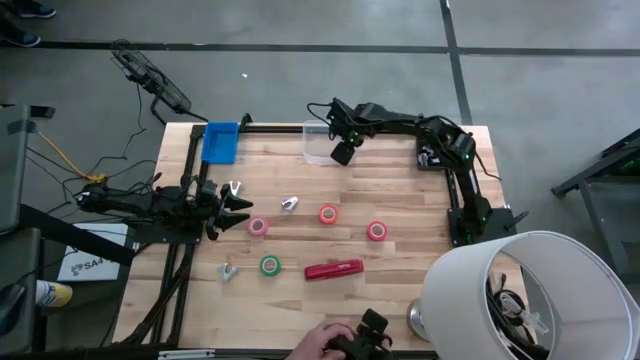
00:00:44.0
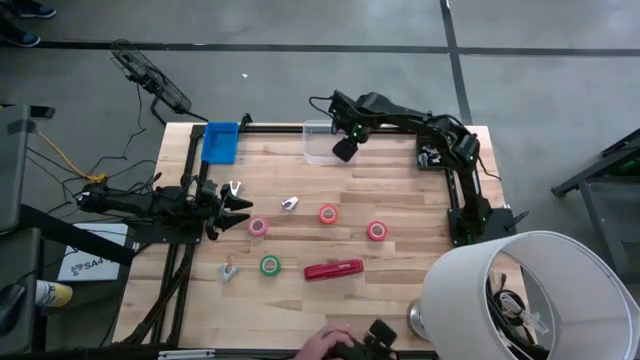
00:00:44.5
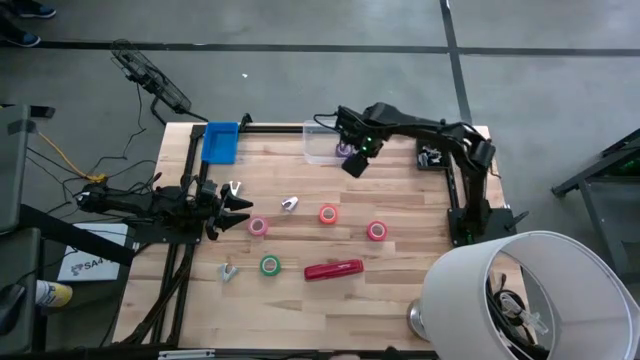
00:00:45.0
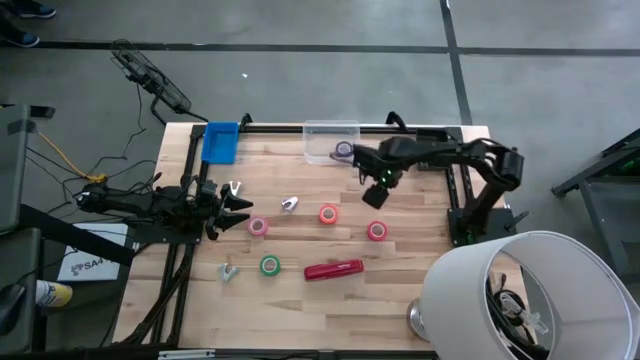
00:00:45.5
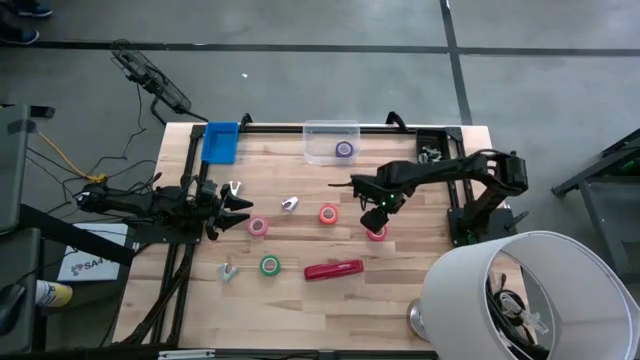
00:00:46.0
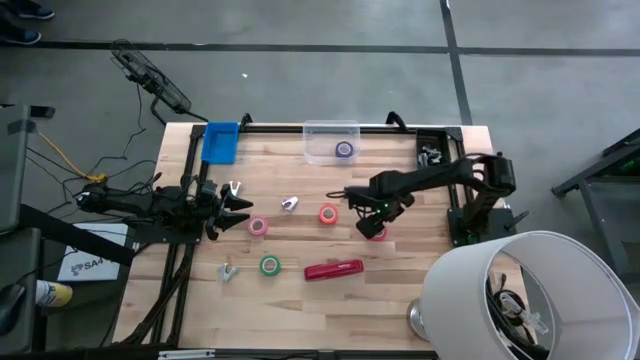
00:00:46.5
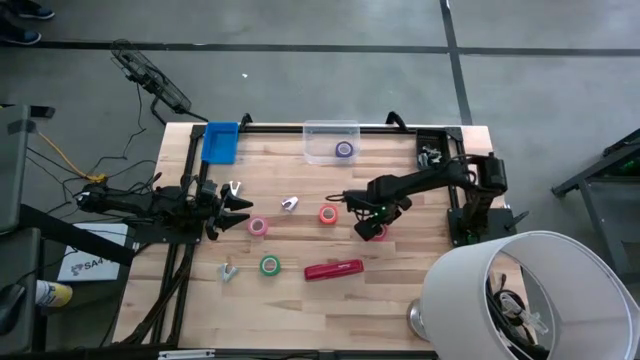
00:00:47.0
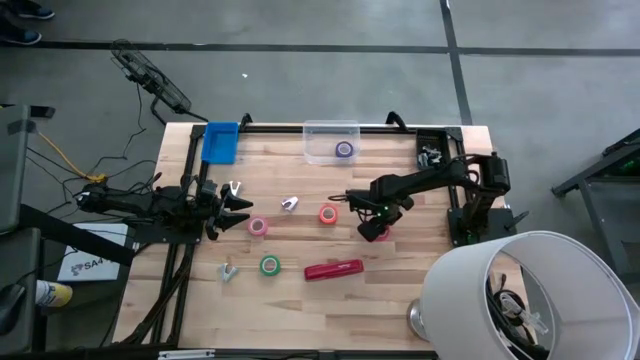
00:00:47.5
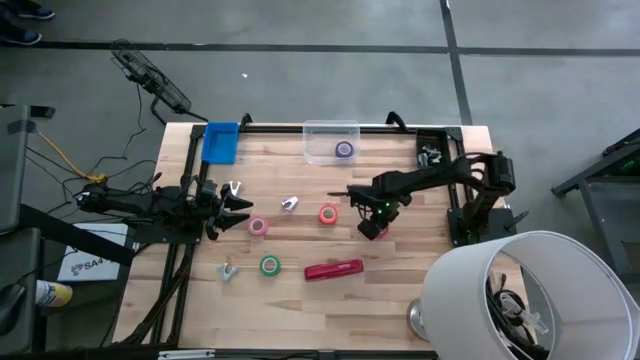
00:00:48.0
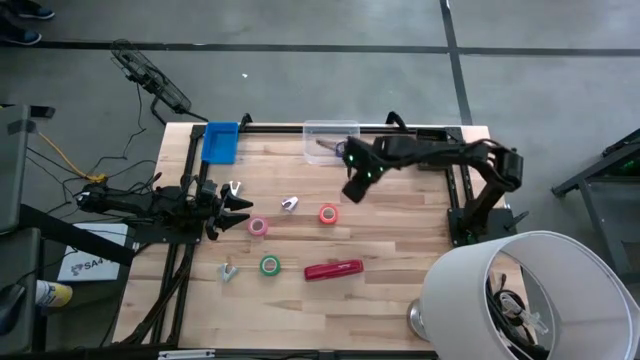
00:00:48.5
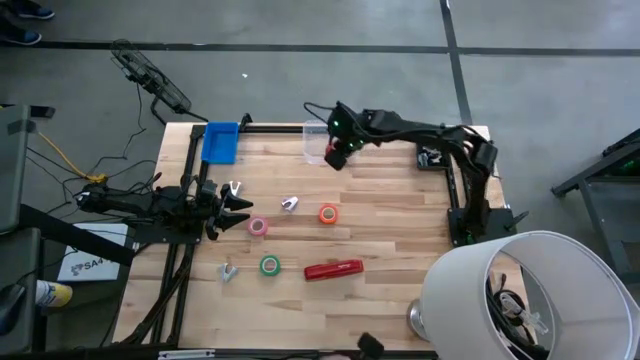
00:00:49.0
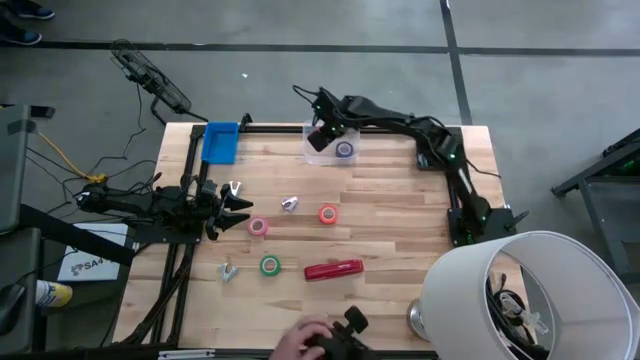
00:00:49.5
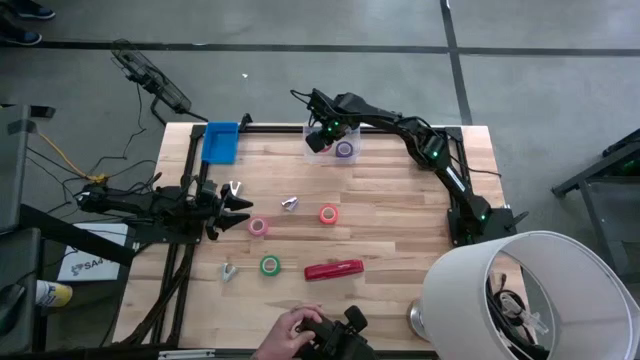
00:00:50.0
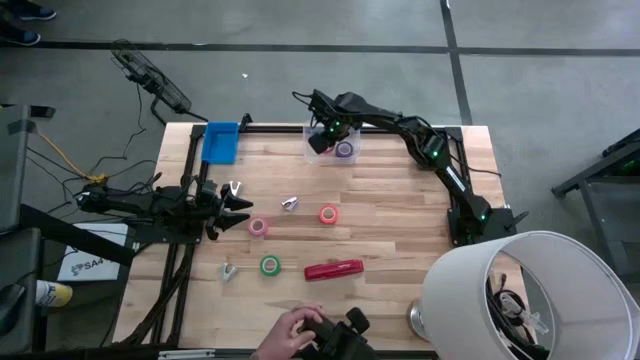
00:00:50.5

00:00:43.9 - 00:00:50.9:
Task: Pick and place Stapler, Stapler remover, tape
Put the red tape into the transparent bin

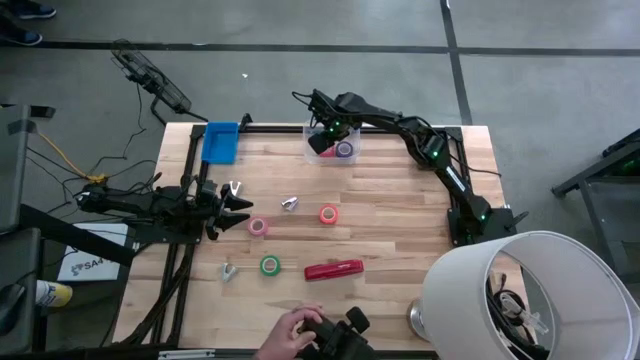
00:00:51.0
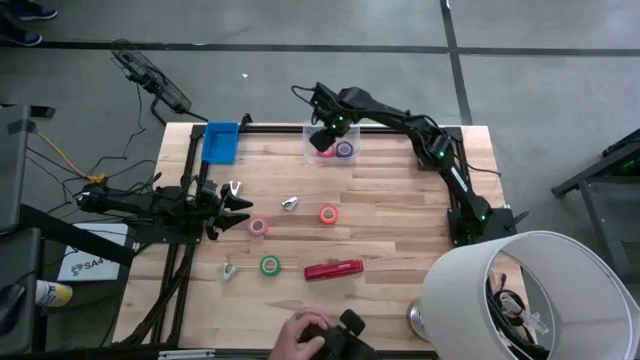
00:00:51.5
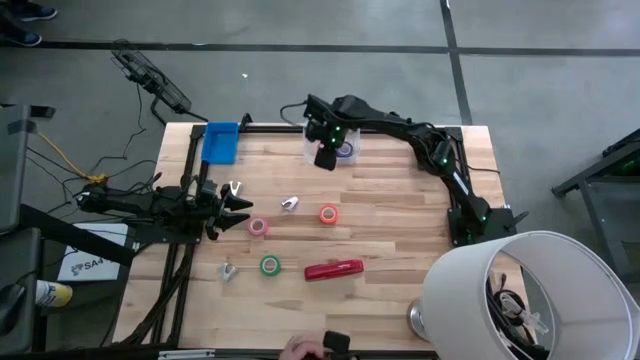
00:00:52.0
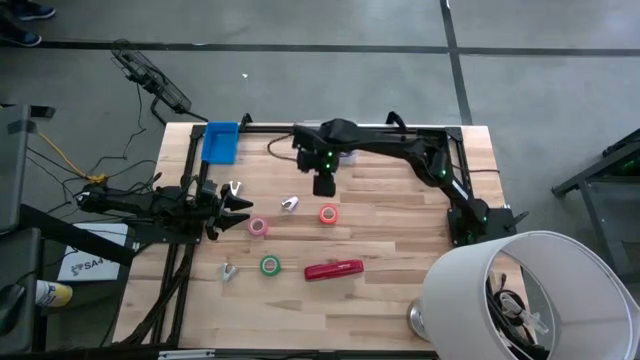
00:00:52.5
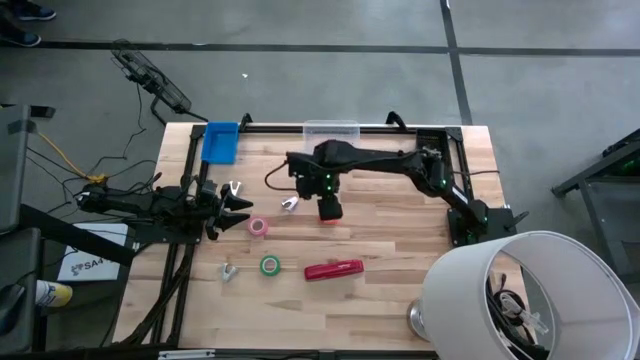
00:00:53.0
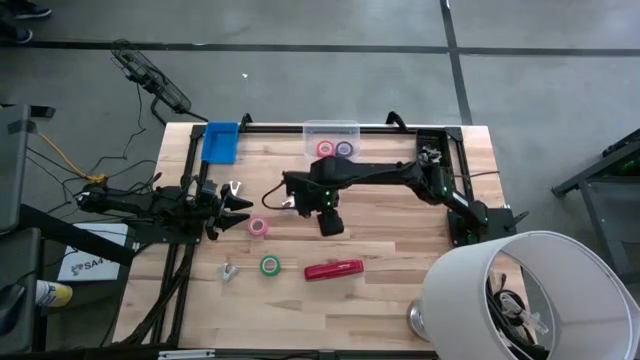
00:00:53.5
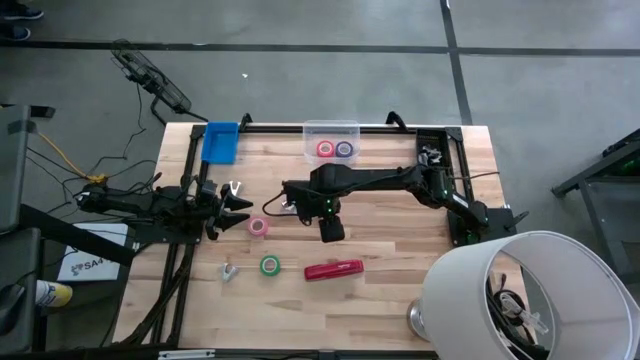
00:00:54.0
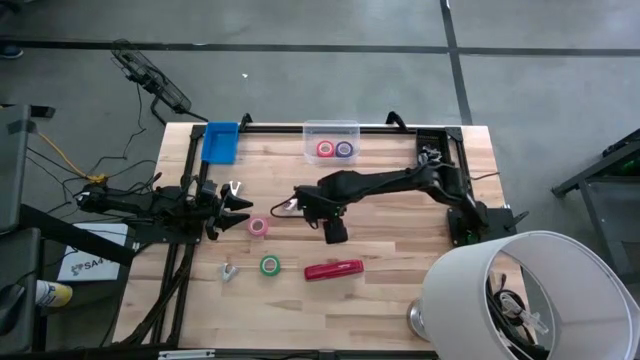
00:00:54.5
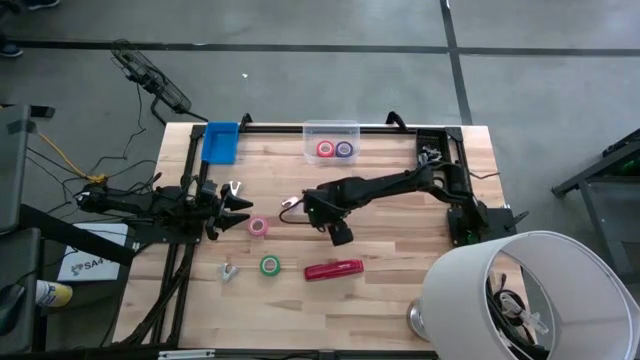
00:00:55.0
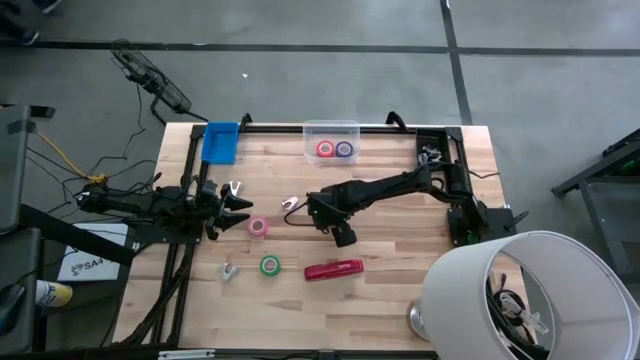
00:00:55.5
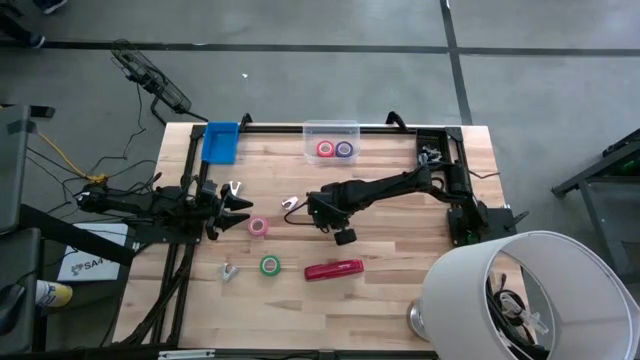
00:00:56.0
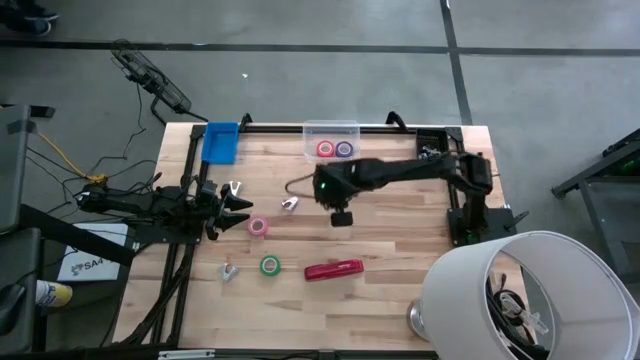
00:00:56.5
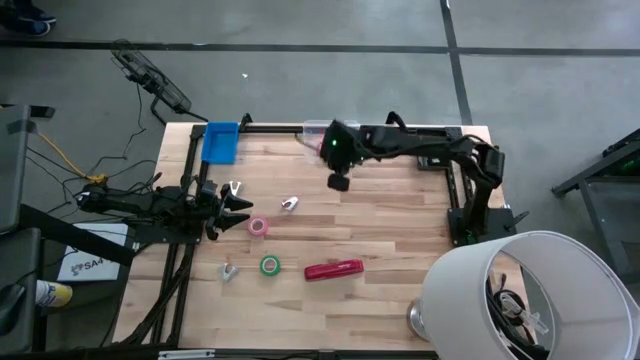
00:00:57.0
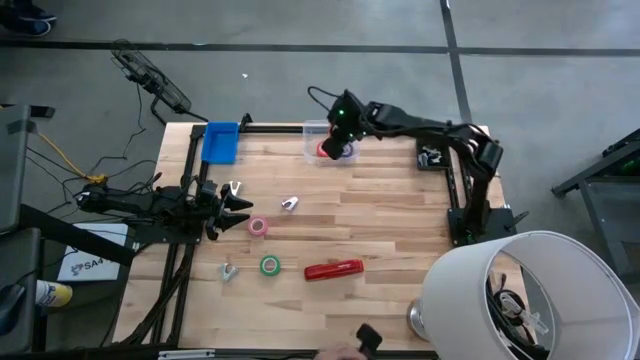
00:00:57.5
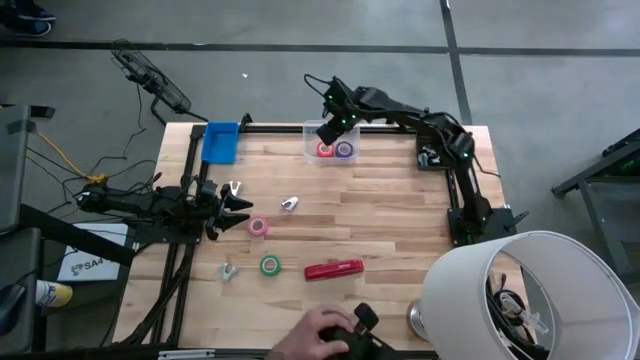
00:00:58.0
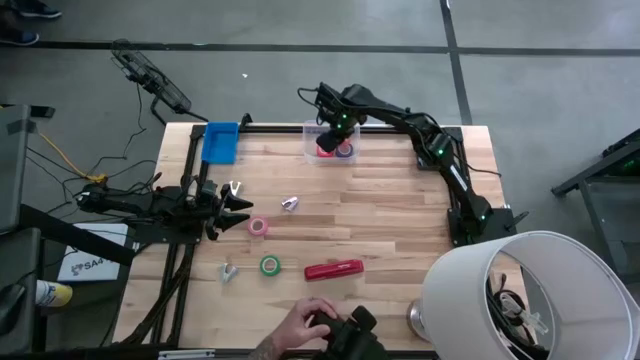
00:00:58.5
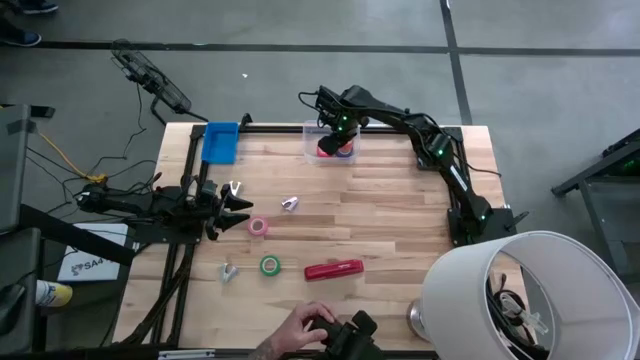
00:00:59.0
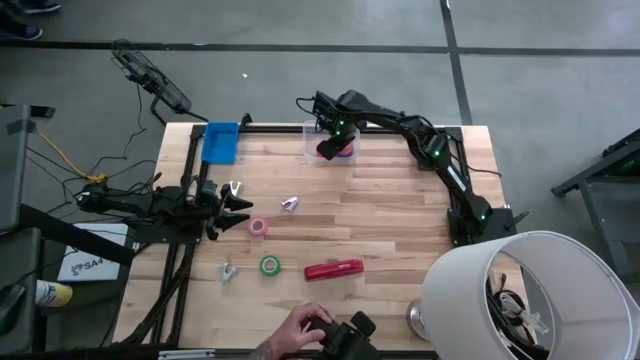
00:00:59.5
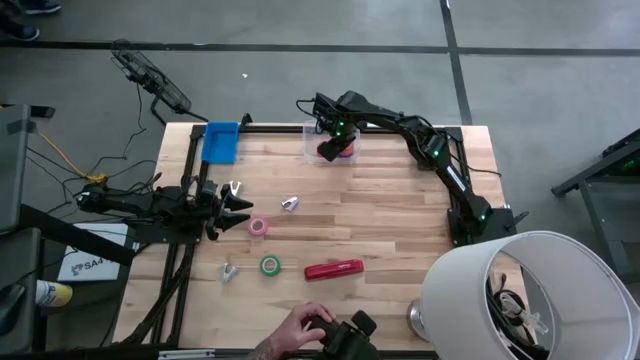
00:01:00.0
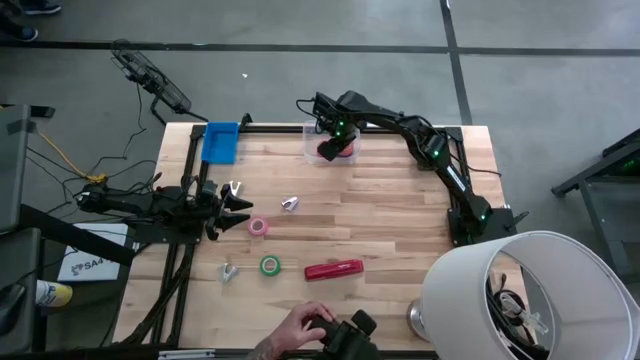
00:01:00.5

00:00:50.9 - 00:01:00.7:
Put the orange tape into the transparent bin

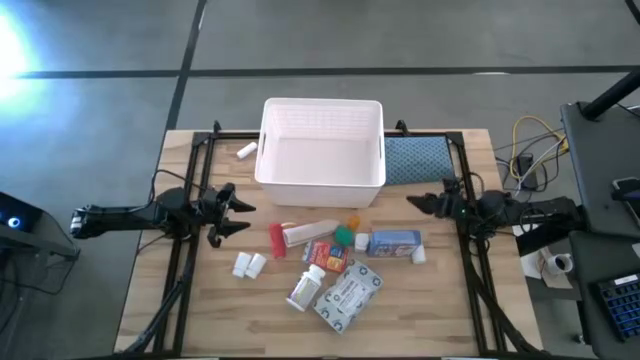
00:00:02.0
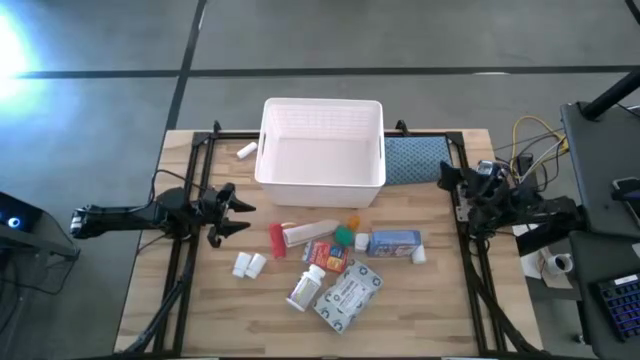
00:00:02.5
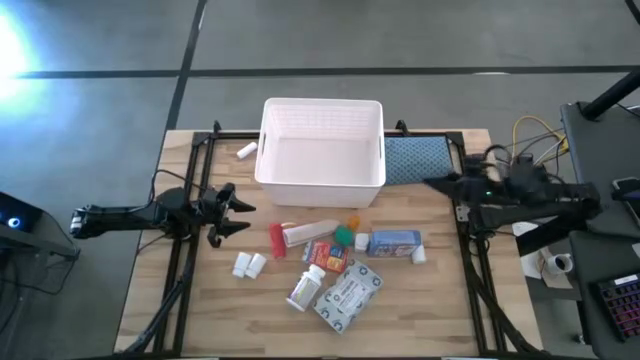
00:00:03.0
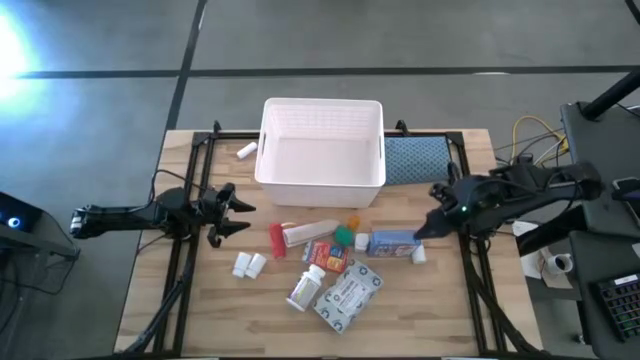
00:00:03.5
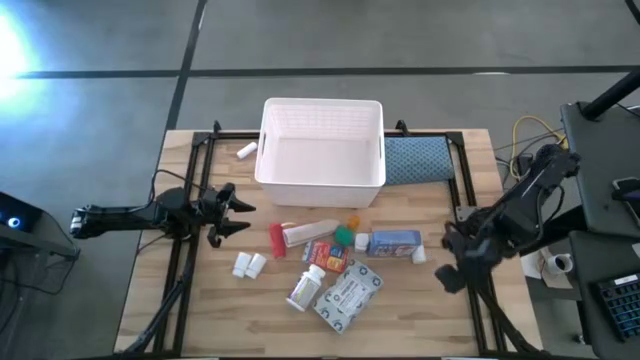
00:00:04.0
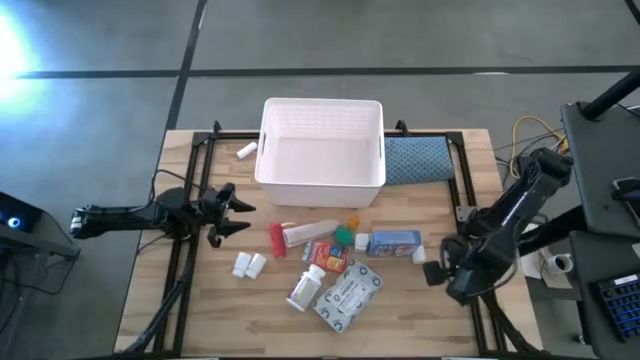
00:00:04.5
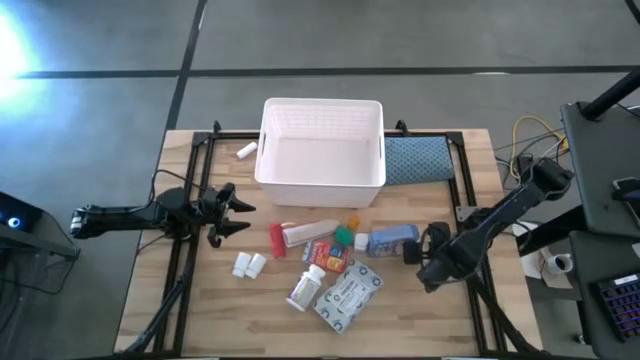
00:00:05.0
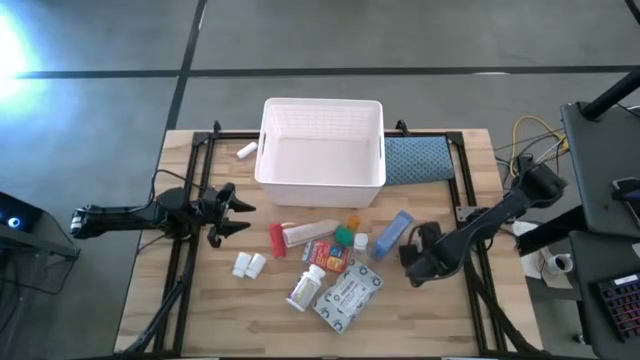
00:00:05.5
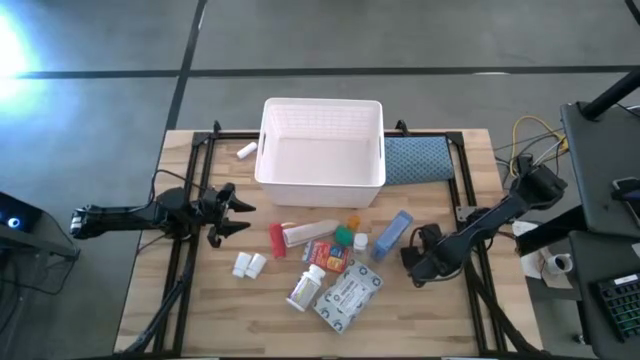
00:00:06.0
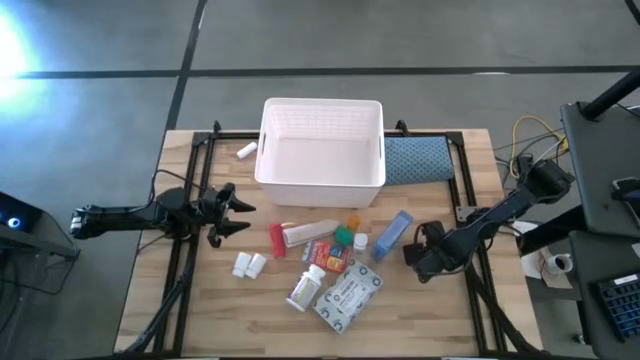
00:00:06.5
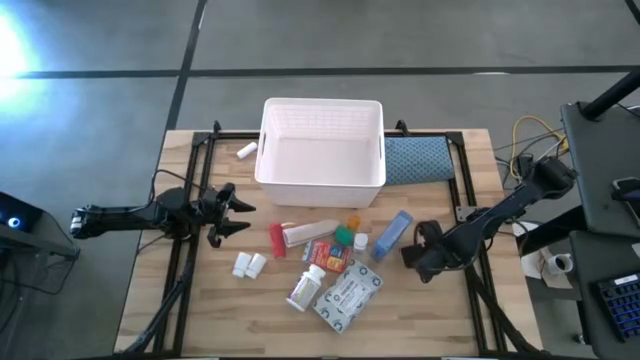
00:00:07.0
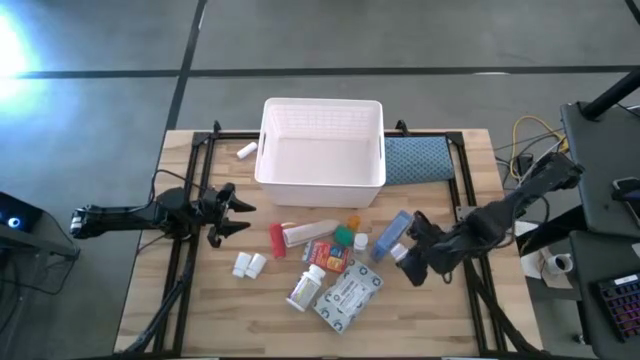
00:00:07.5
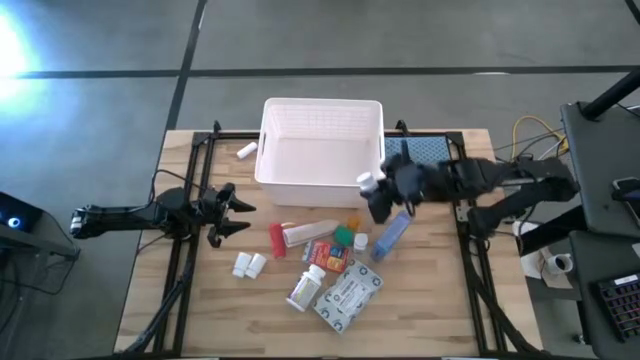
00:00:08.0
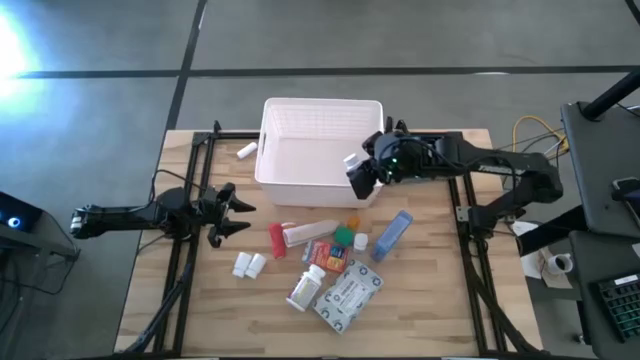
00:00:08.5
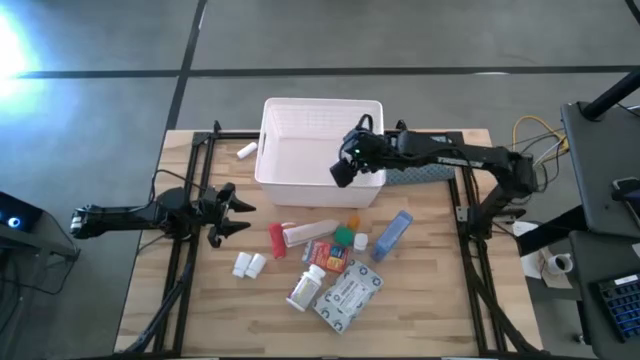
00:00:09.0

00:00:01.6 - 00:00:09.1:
Task: Pick & place medical supplies in basket/bin
Put the right white medicine bottle into the white bin
